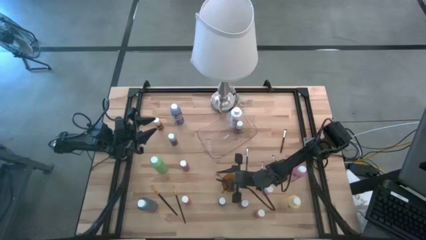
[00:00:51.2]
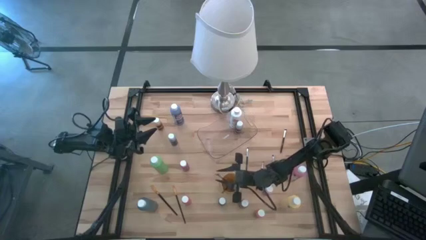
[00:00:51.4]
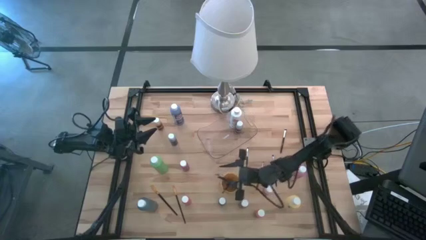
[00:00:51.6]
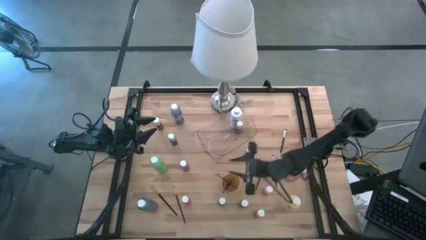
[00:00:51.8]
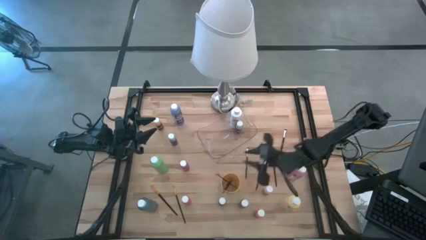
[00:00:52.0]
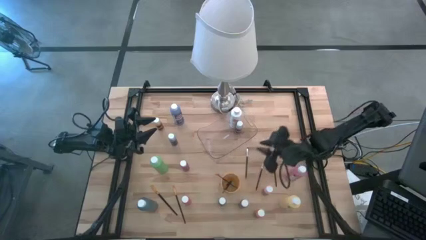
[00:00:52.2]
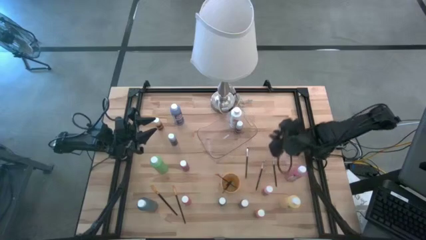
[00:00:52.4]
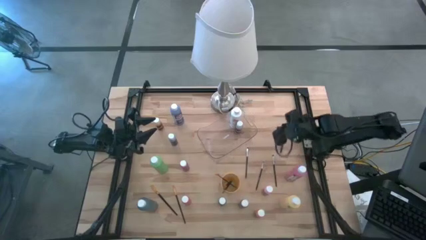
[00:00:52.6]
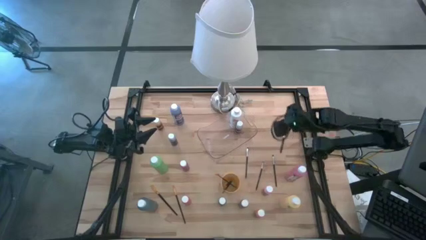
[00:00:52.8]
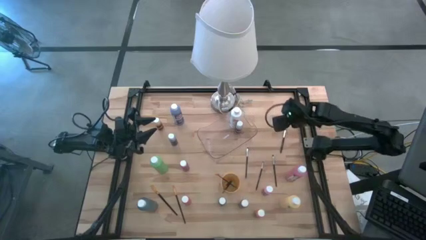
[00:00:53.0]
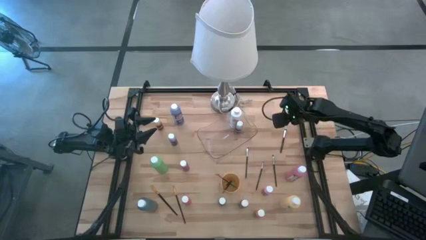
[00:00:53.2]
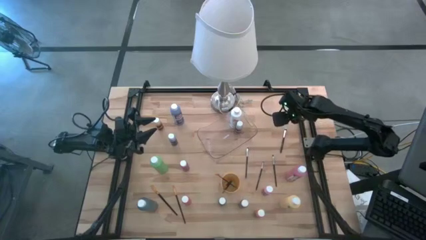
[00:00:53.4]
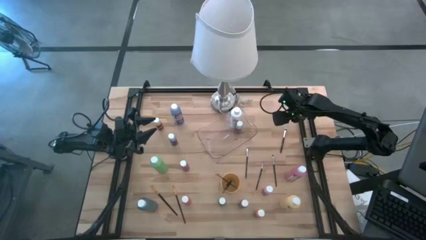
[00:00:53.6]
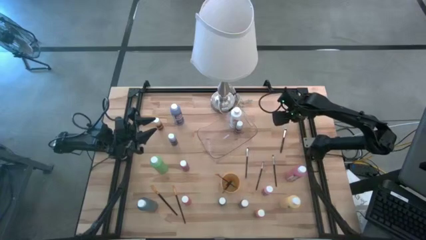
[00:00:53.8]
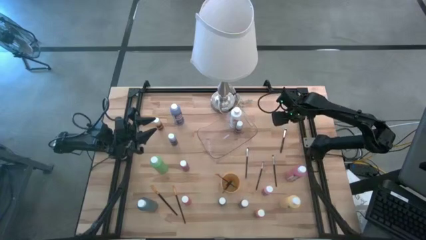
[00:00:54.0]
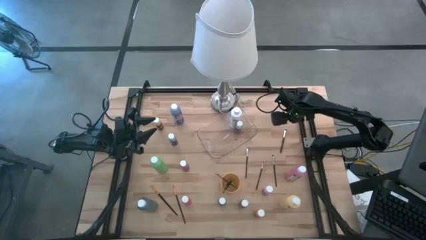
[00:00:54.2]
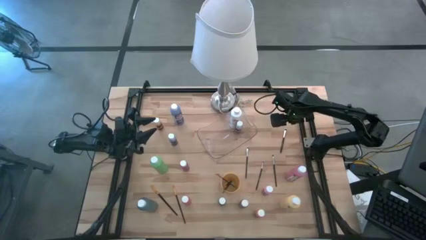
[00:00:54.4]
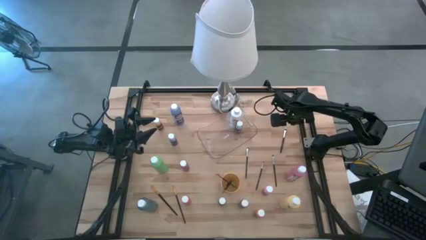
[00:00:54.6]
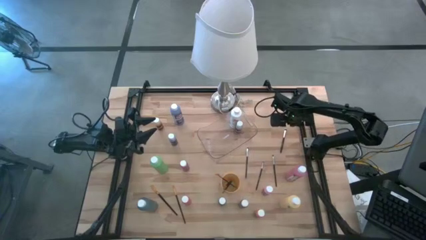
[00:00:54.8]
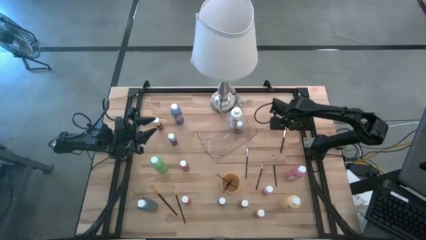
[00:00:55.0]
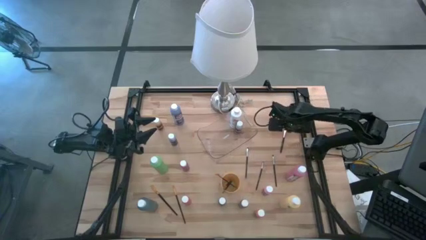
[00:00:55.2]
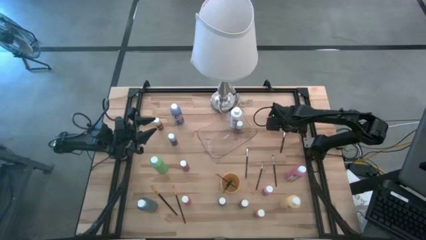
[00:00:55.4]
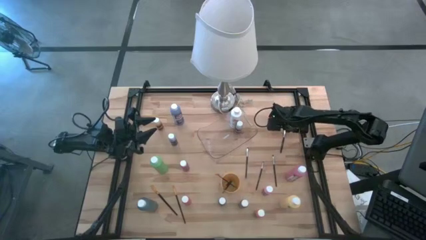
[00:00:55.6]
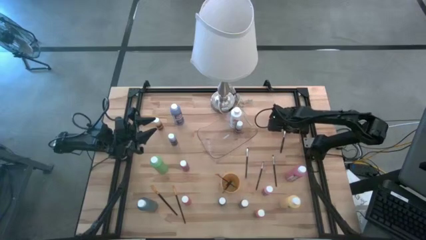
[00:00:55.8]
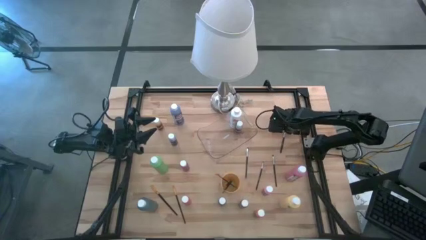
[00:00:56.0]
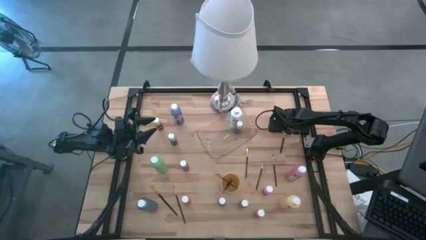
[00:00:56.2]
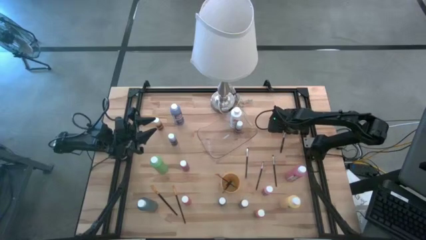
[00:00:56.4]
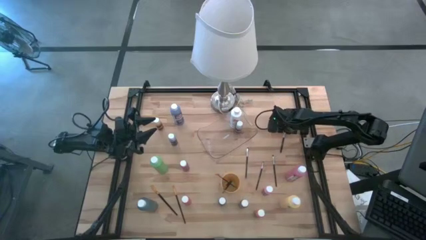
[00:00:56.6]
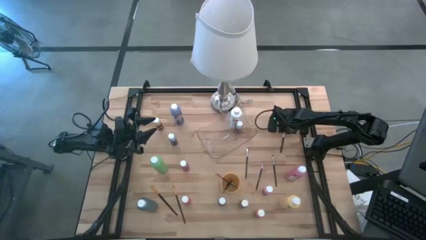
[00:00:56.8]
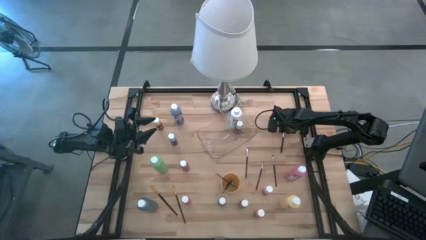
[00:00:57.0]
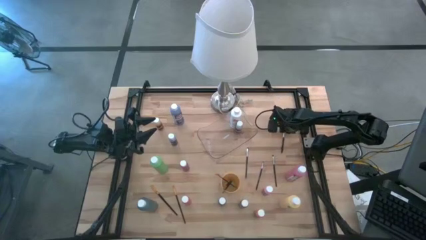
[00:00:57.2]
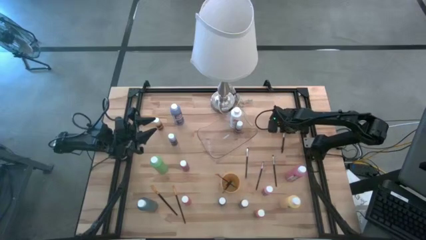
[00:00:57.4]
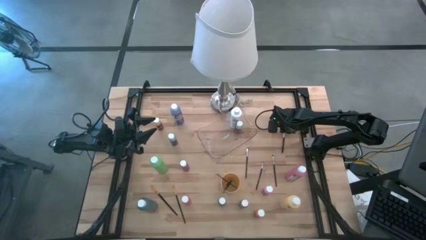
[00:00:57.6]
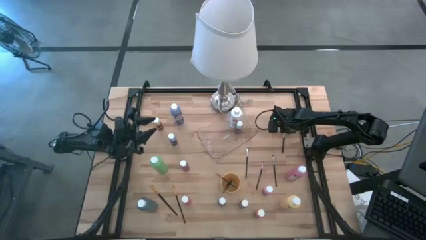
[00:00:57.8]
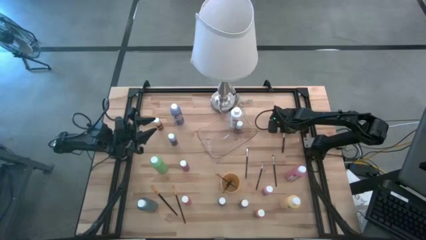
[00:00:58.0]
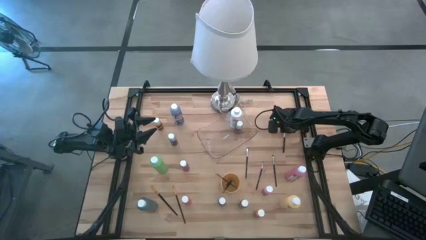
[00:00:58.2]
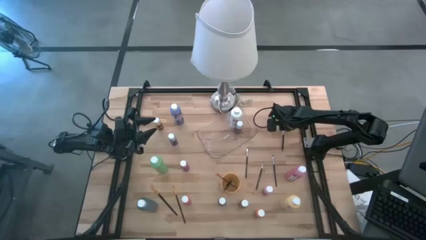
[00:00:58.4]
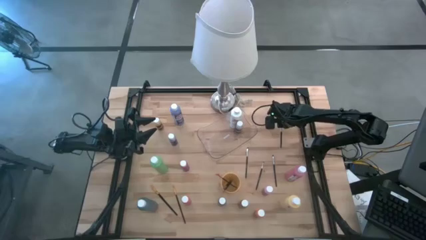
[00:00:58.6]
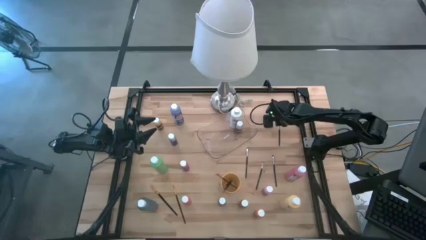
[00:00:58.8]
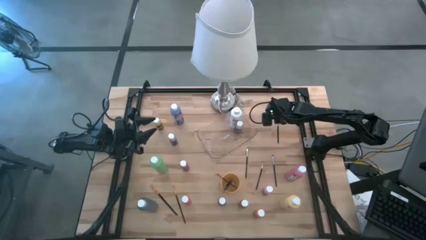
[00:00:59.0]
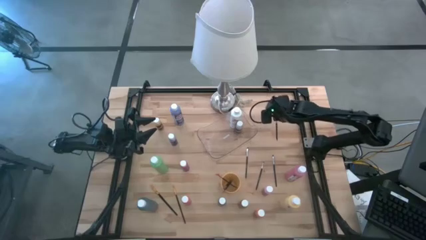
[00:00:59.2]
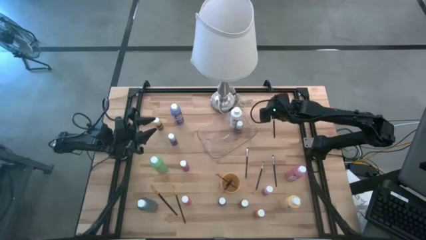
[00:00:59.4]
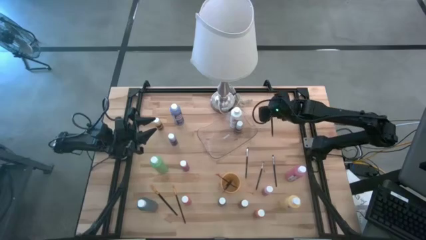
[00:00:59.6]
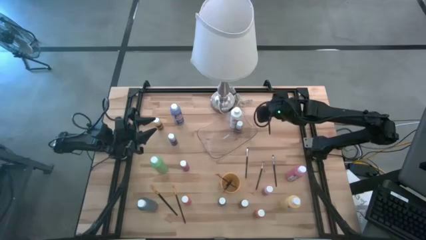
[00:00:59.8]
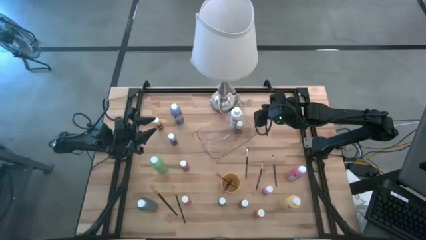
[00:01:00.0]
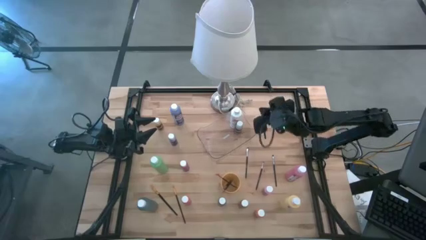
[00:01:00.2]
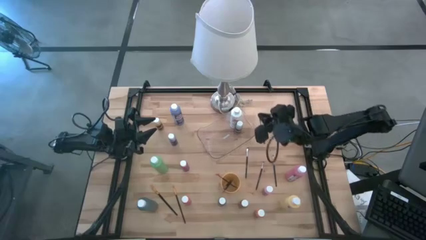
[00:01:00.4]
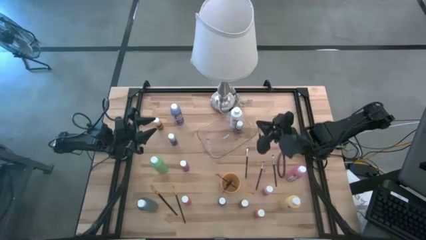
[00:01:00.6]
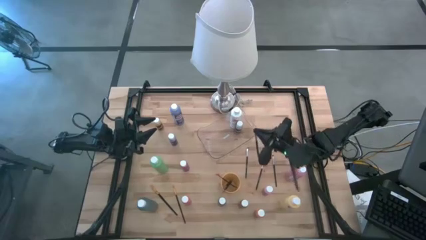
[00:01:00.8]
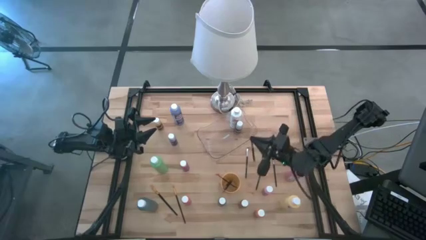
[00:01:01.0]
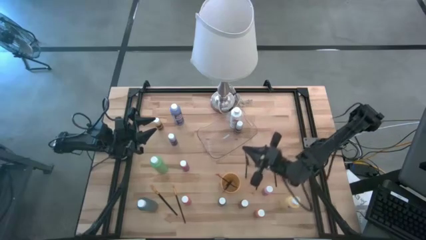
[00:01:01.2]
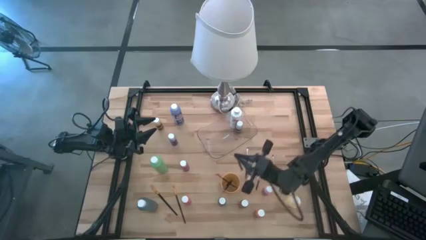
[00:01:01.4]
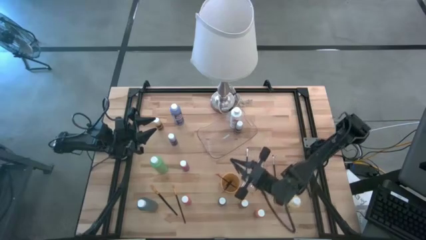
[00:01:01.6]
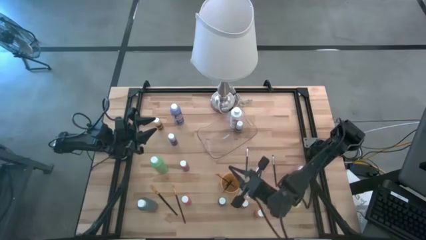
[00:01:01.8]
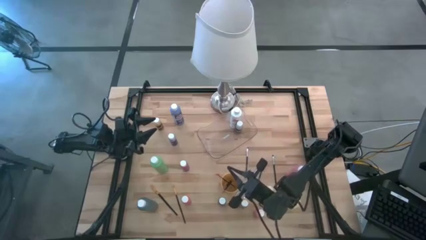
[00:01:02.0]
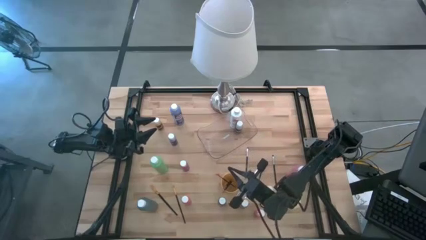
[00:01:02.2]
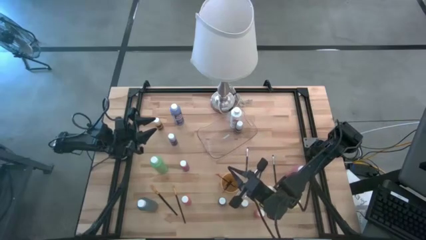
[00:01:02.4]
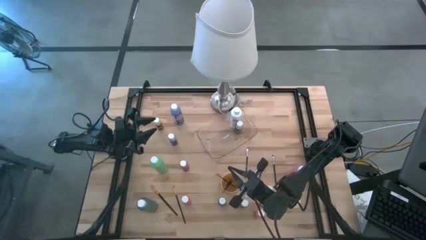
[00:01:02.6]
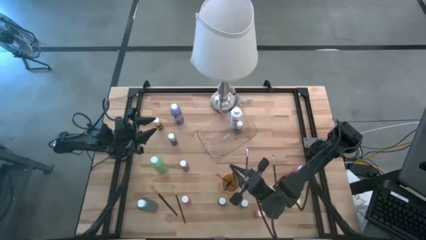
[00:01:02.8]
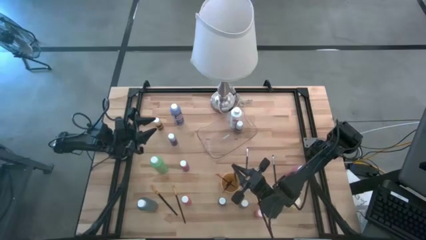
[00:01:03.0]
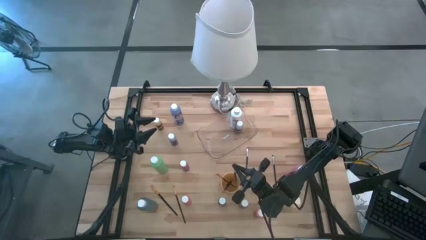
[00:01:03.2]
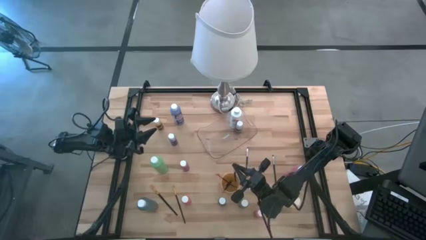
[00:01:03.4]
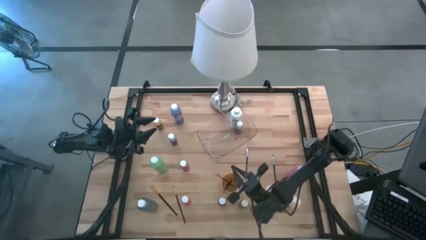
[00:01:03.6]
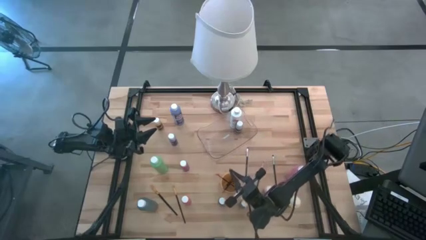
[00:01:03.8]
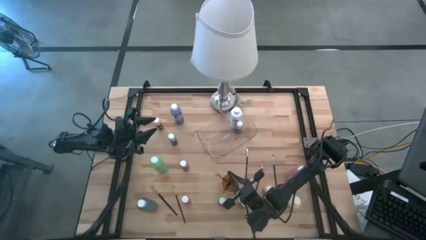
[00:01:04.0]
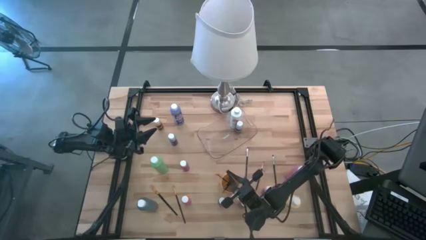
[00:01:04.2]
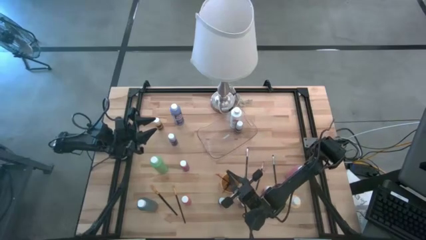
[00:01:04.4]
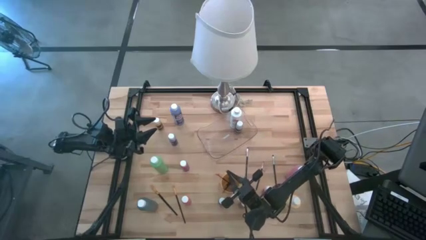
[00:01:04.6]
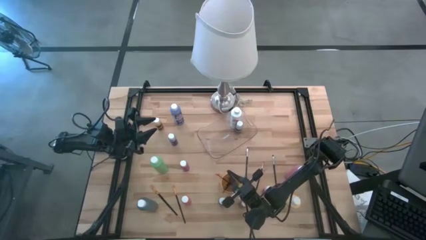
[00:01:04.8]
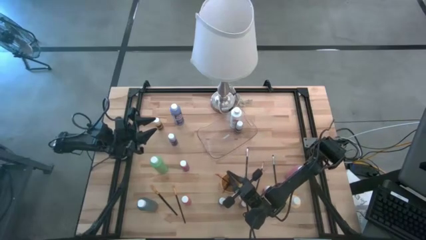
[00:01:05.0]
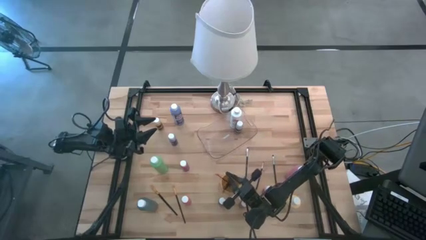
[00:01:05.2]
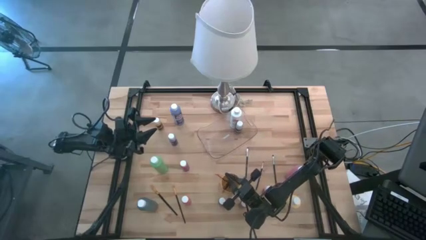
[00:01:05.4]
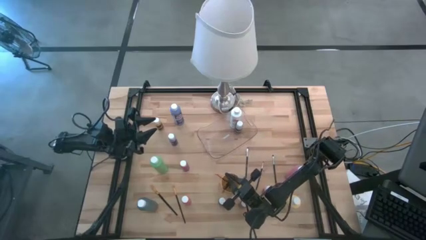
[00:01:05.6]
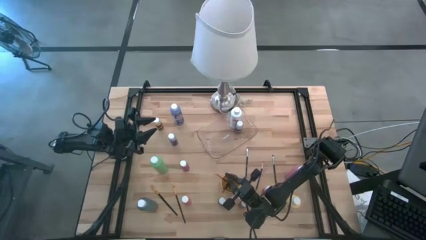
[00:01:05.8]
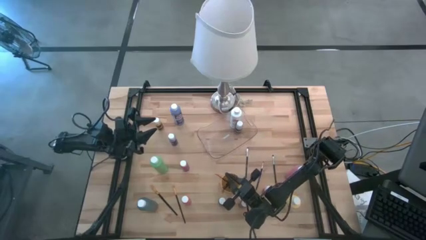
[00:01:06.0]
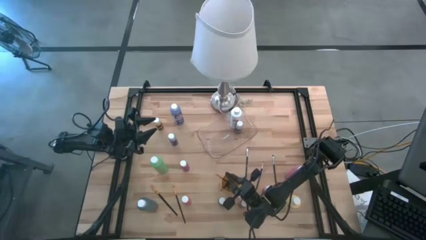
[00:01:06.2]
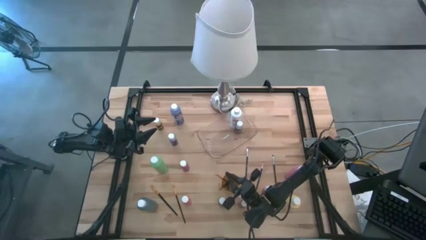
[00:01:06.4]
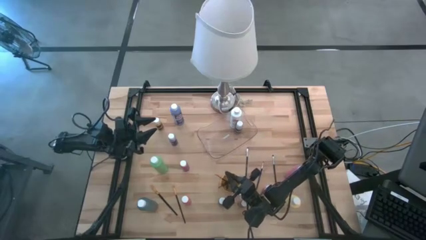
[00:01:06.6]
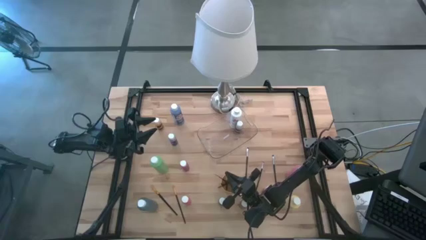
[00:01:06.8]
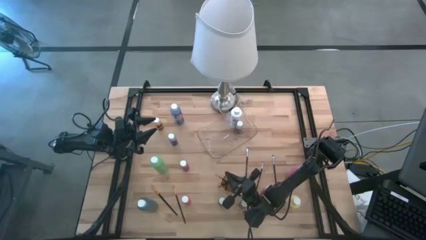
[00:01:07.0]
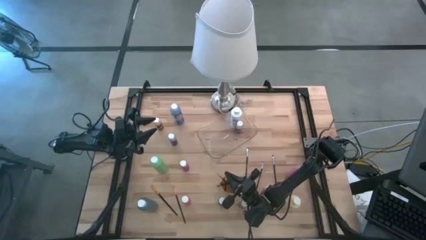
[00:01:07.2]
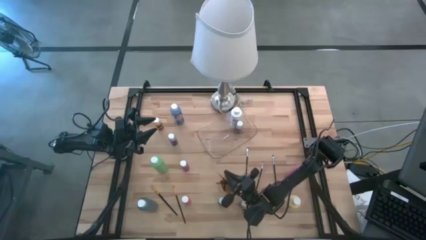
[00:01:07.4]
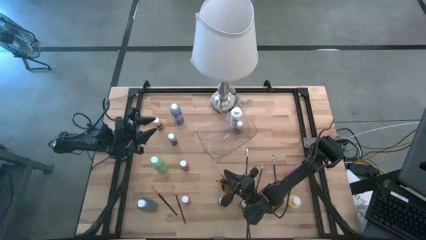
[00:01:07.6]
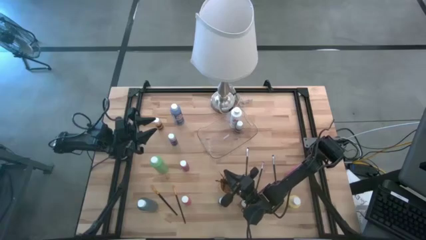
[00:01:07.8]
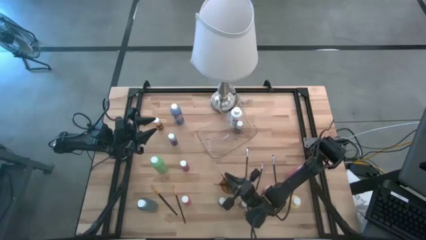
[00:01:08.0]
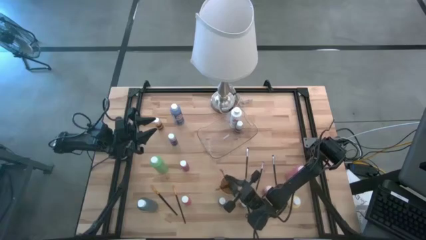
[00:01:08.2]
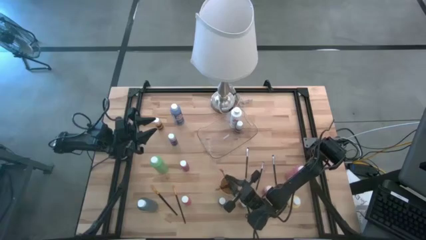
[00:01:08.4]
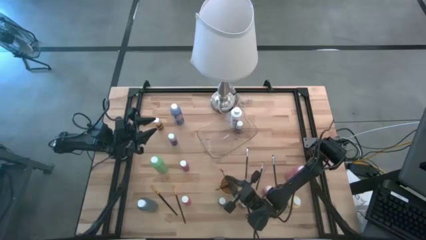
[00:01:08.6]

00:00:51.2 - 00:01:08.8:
Task: Pick & Place Paint Supplies
Put the black paint brush into the yellow cup
